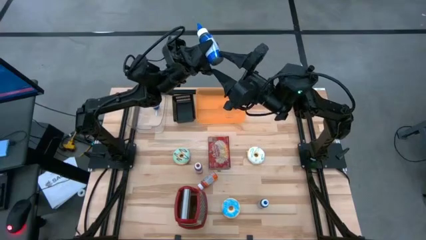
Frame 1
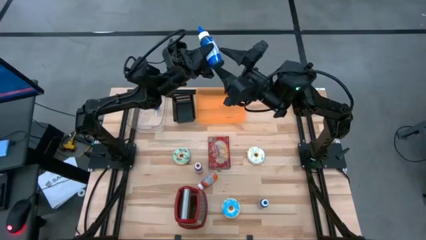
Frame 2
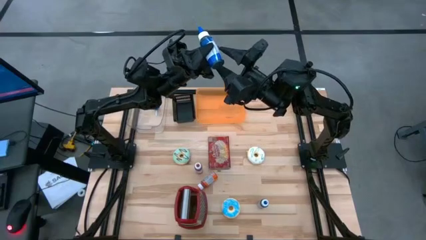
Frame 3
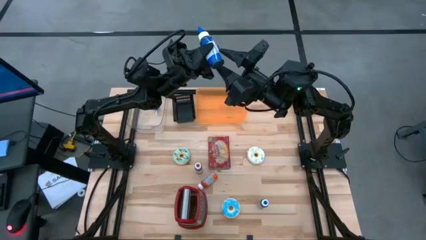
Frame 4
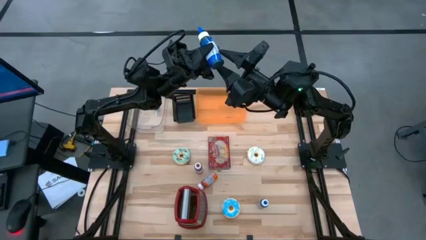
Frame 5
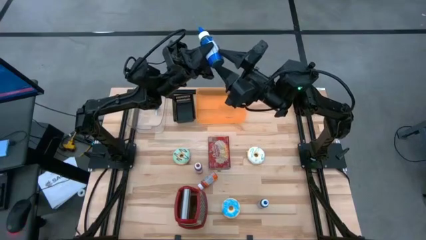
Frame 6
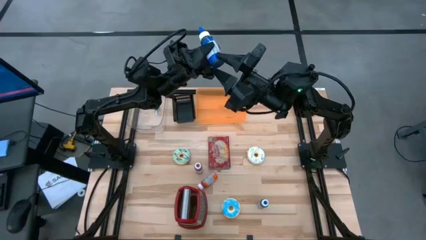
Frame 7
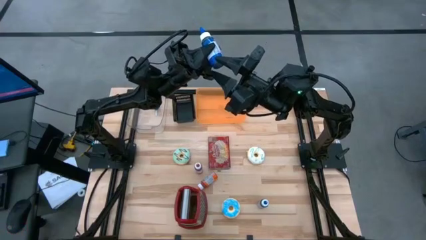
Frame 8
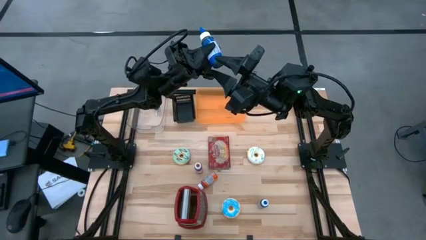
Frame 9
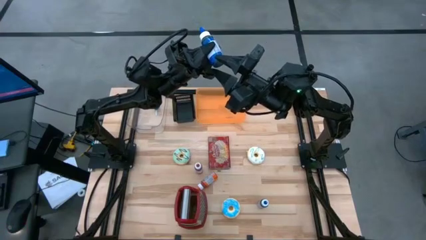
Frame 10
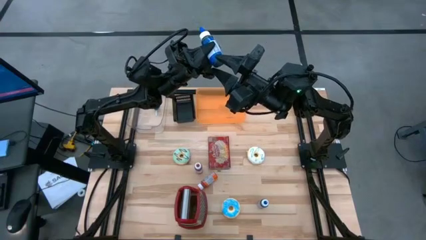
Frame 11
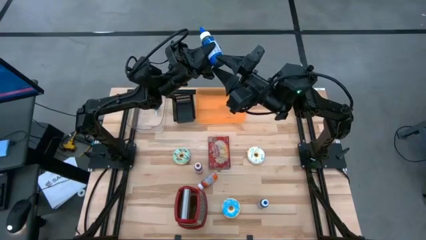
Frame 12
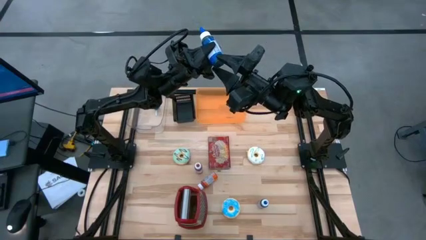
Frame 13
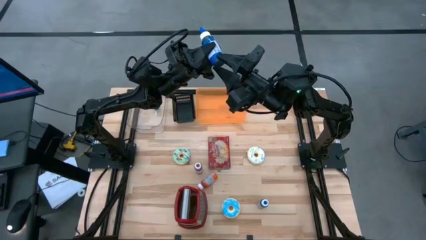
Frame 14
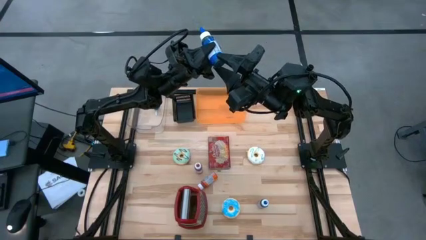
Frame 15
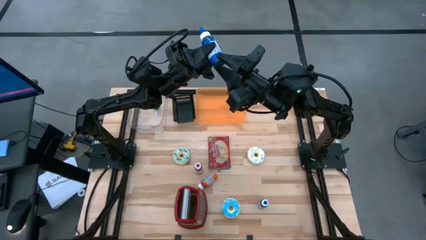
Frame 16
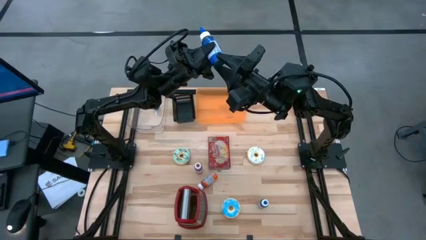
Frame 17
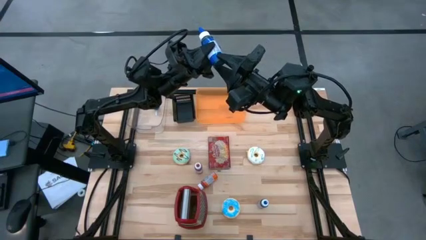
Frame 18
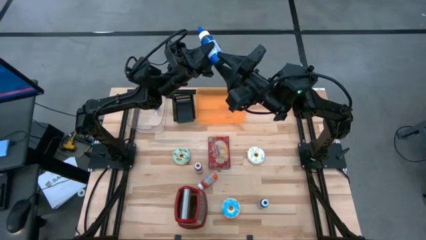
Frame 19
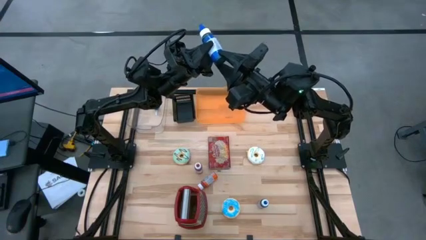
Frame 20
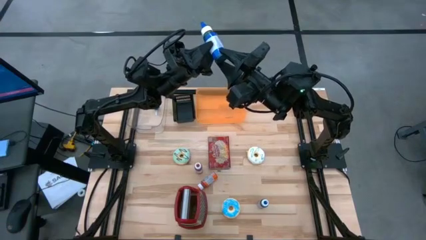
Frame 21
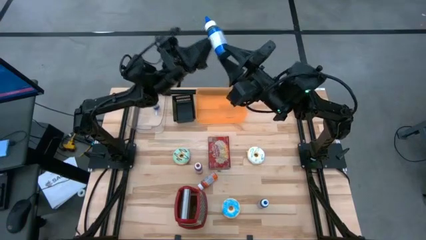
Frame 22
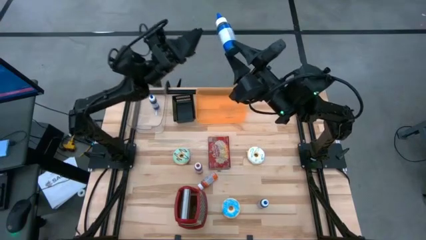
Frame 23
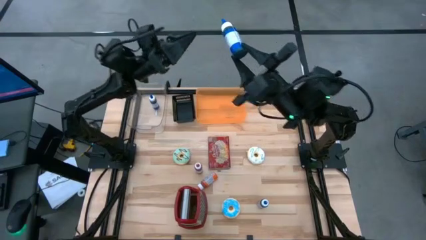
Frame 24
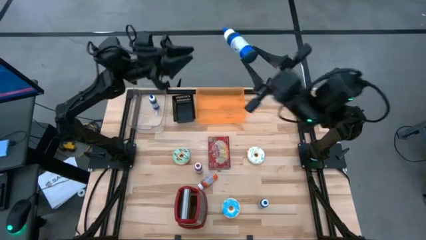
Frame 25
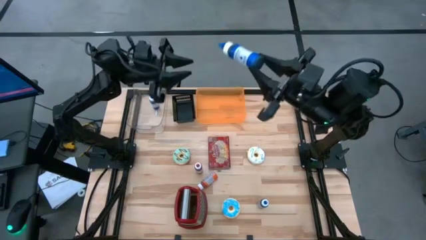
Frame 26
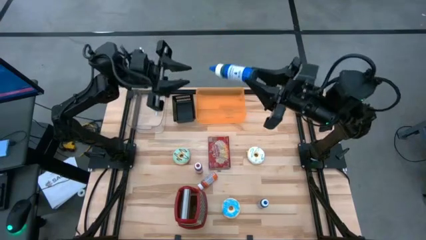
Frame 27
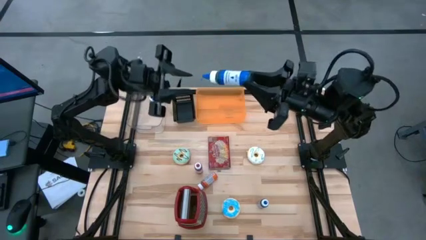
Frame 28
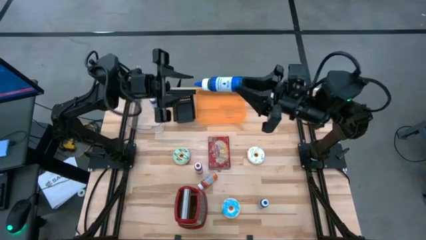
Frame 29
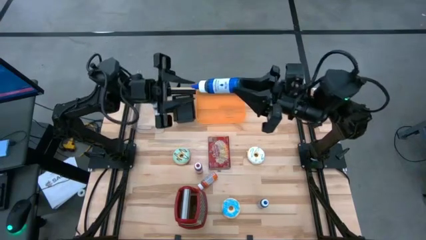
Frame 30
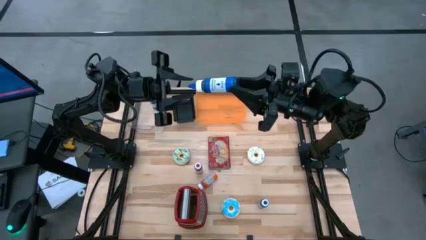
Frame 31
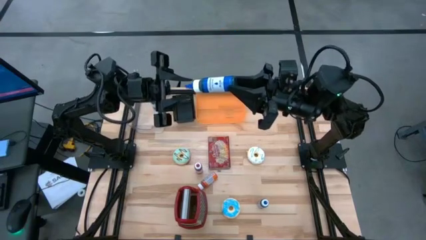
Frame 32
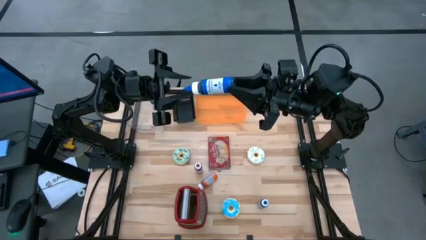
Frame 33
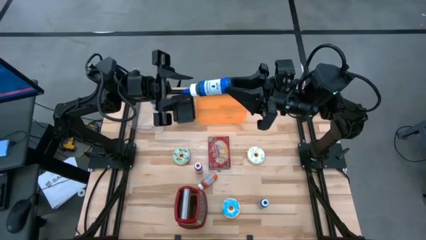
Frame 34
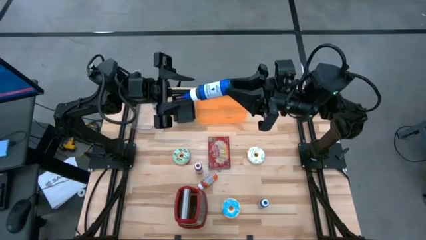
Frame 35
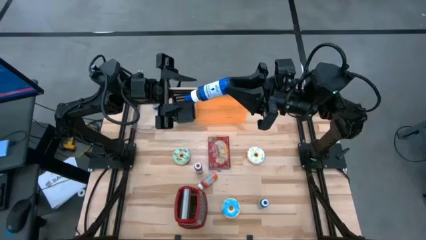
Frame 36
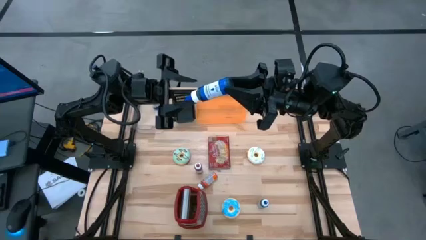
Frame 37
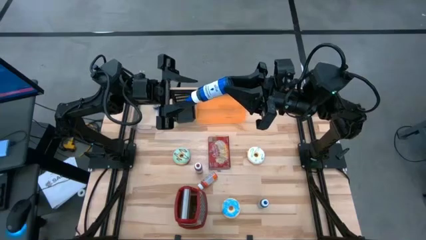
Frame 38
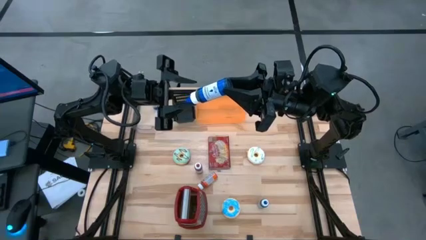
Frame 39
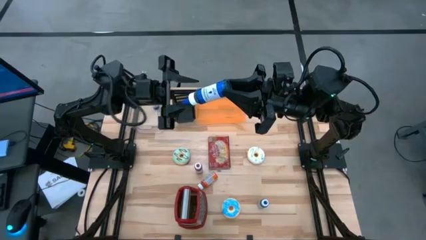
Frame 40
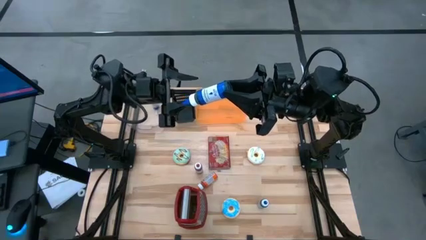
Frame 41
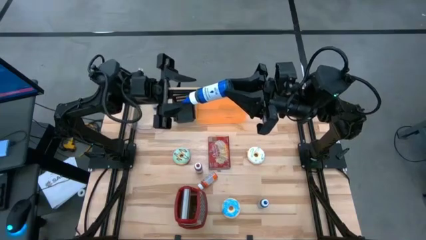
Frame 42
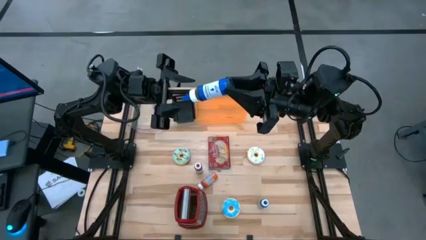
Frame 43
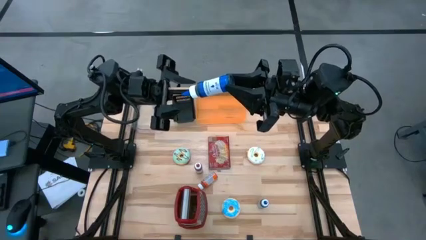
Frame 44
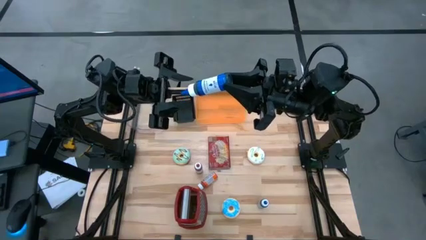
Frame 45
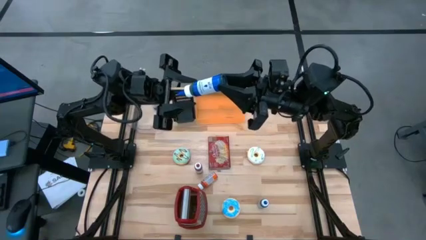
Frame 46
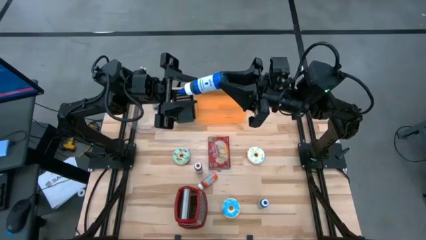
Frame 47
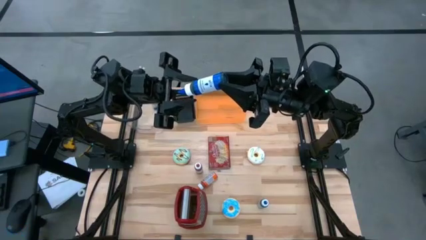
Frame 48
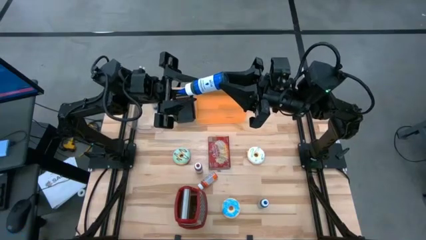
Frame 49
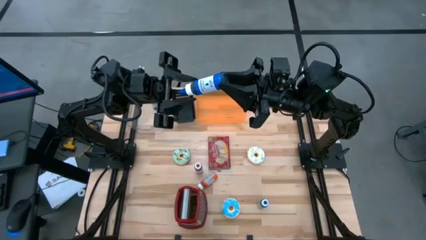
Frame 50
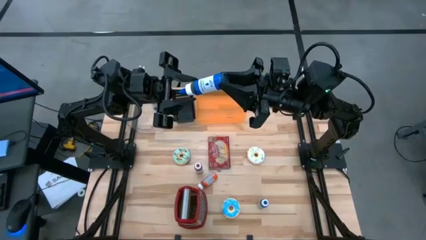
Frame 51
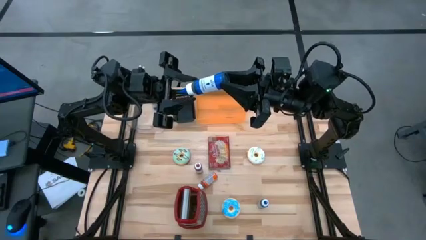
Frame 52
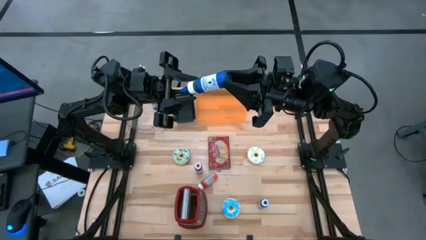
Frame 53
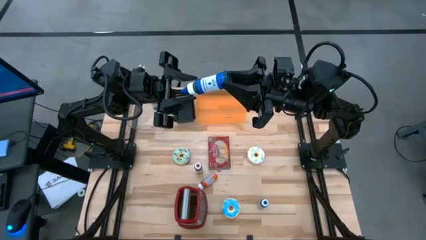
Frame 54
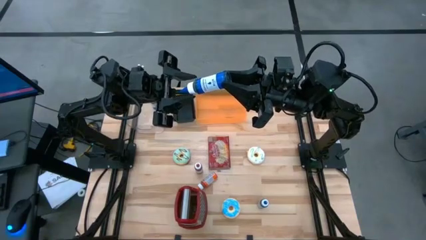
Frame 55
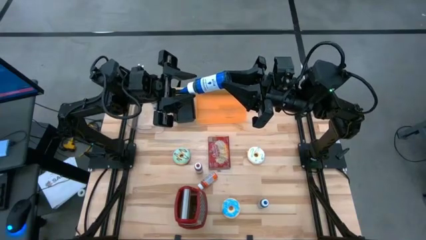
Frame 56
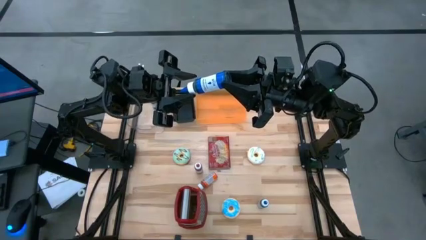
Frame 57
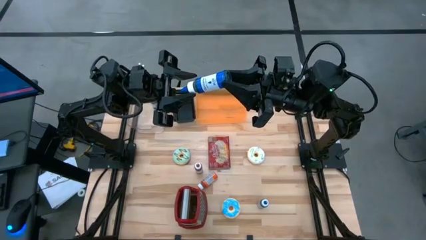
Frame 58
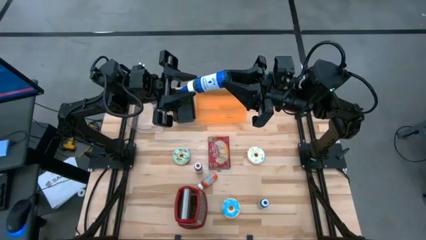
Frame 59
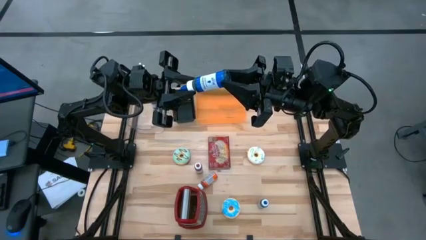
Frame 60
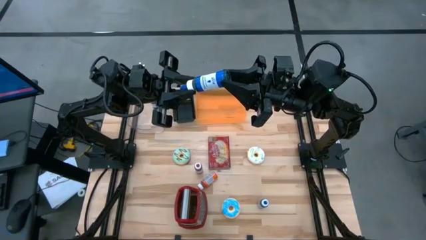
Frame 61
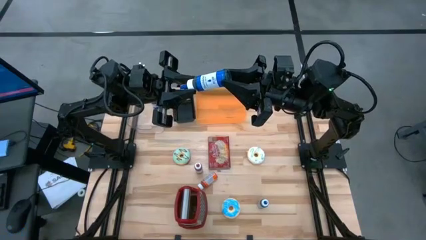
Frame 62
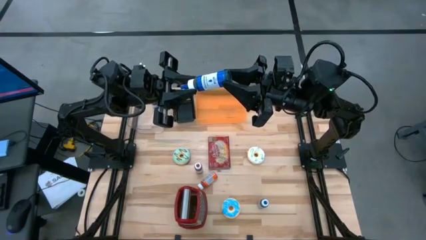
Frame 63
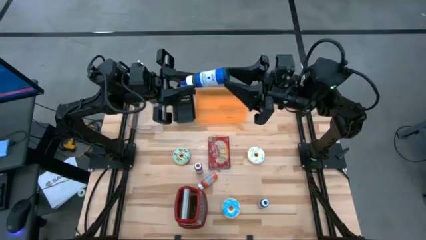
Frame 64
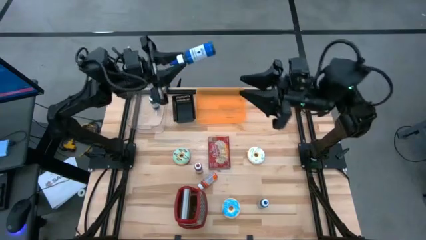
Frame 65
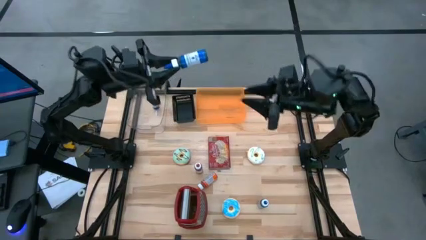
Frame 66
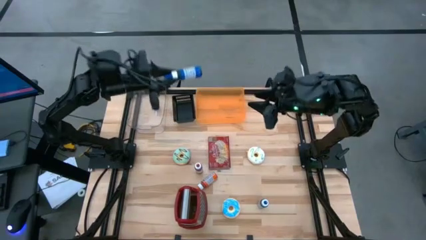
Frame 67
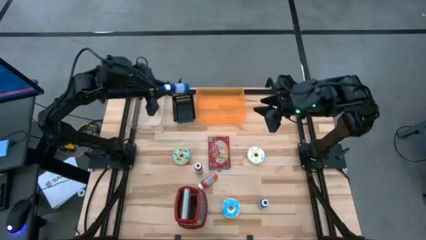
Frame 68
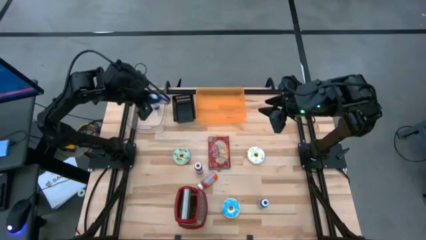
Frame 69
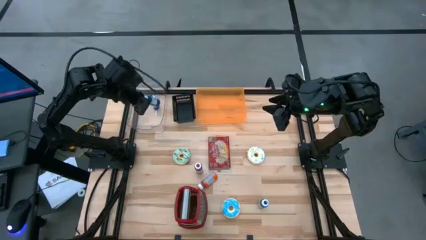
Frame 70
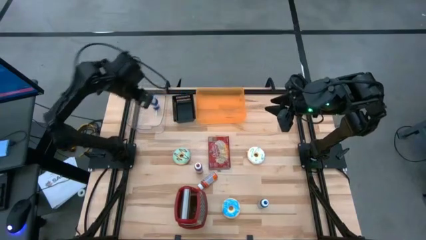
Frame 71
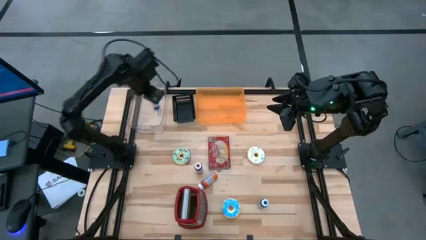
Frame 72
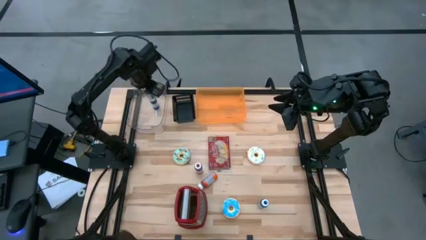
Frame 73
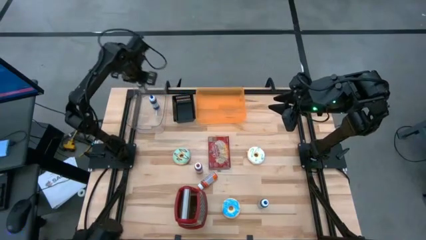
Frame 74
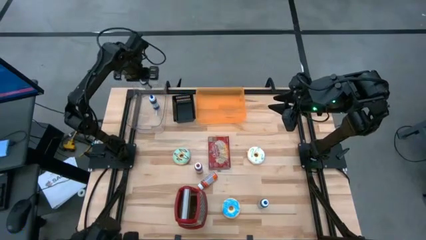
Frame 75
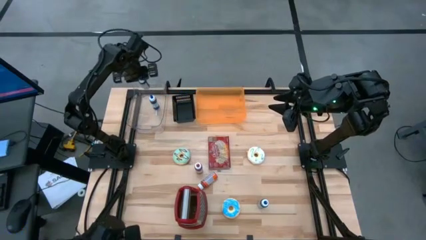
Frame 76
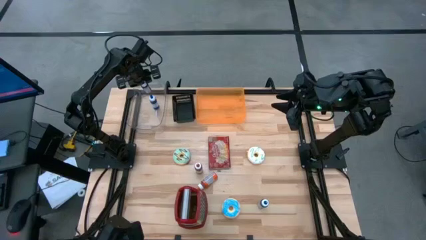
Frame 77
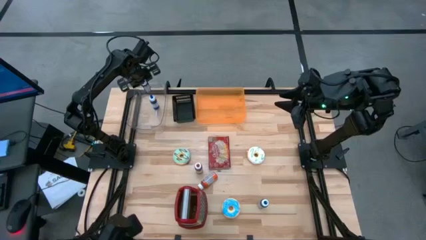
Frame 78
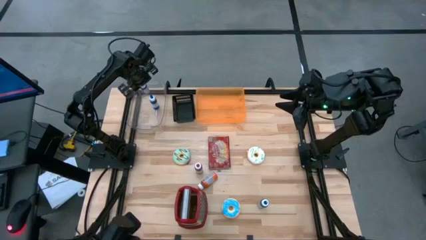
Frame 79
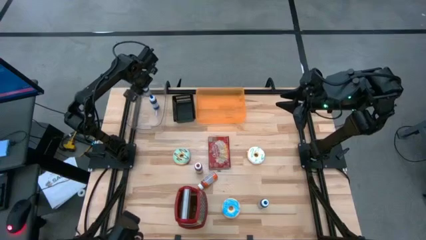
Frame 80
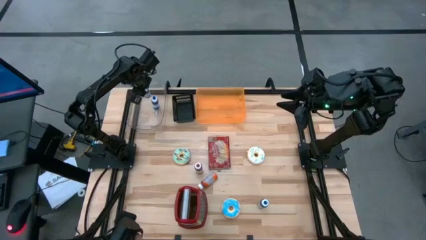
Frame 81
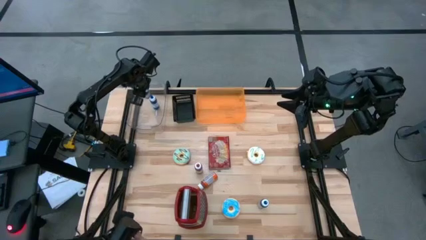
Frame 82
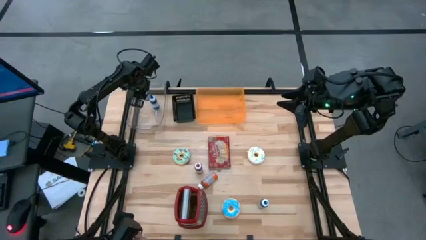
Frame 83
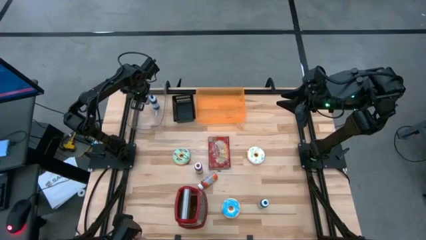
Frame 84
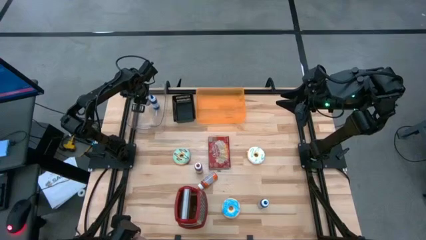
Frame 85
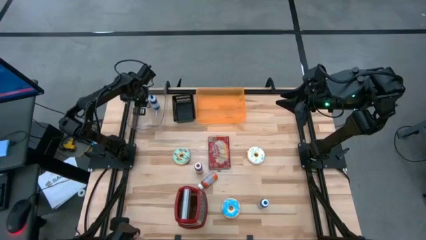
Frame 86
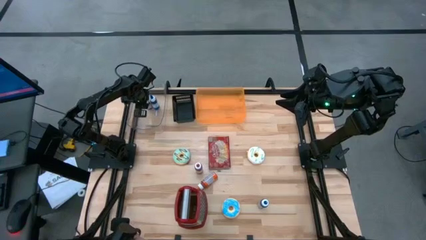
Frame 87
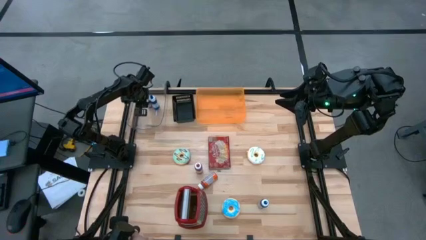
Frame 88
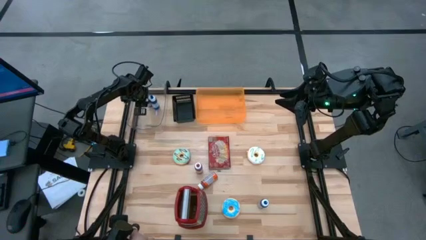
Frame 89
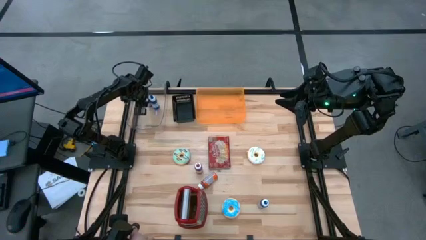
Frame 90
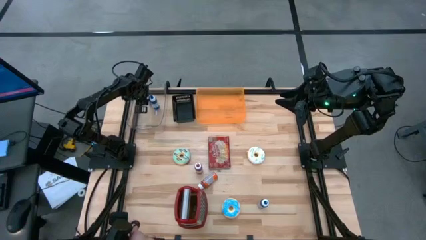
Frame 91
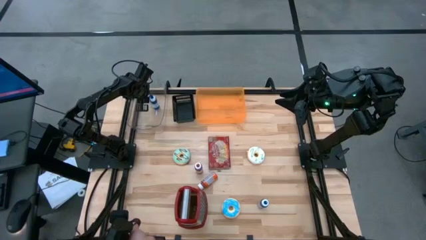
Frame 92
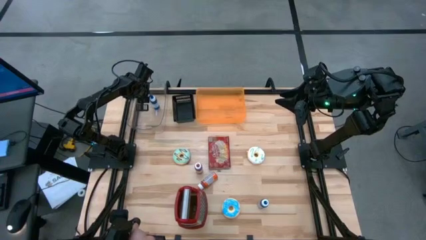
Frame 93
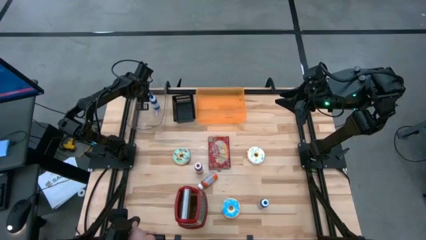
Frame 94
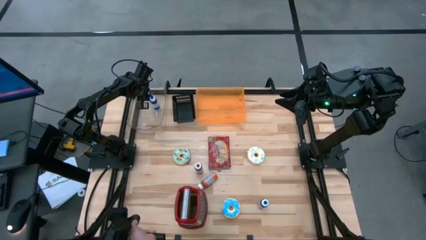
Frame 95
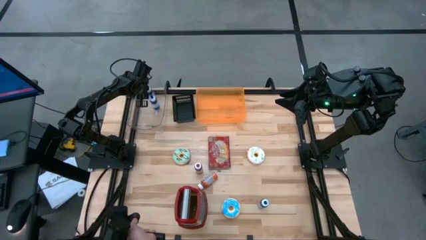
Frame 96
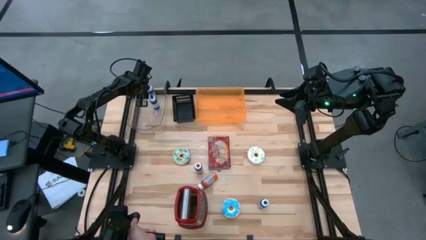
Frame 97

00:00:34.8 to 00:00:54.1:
Put the top blue food coloring bottle into the transparent bin
